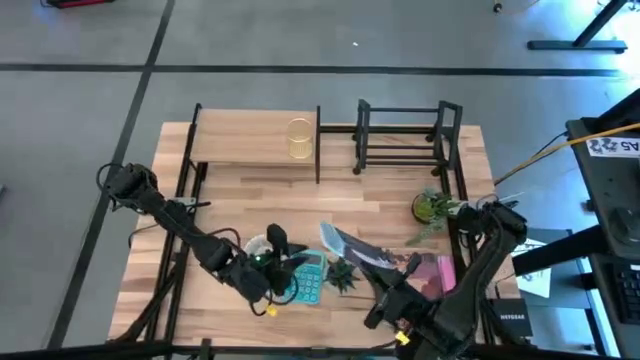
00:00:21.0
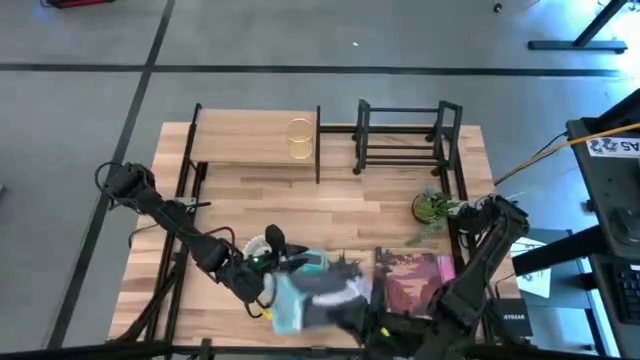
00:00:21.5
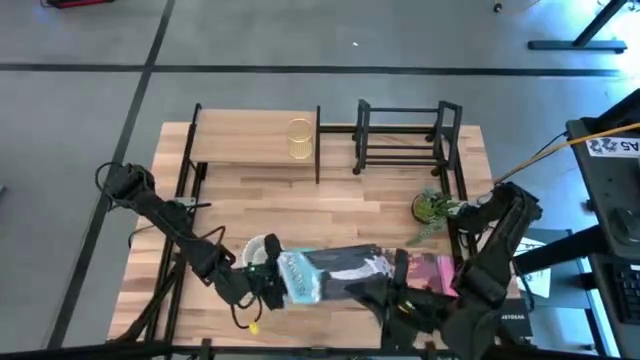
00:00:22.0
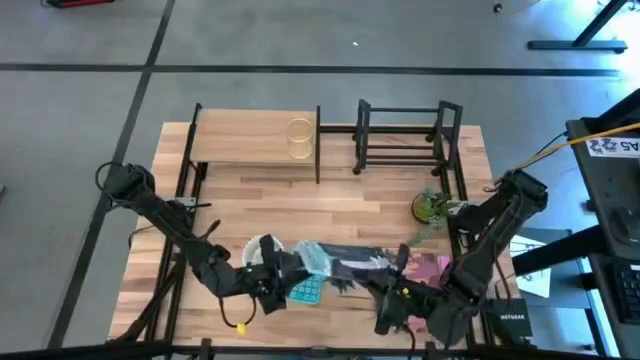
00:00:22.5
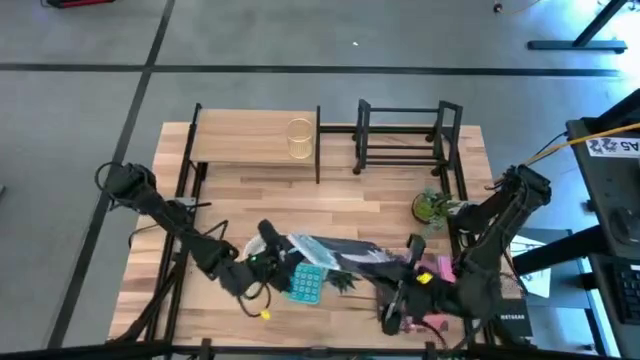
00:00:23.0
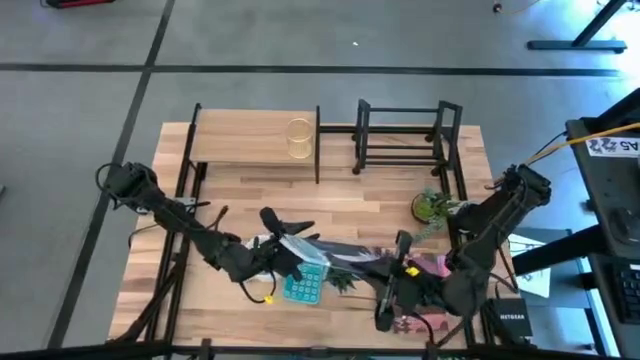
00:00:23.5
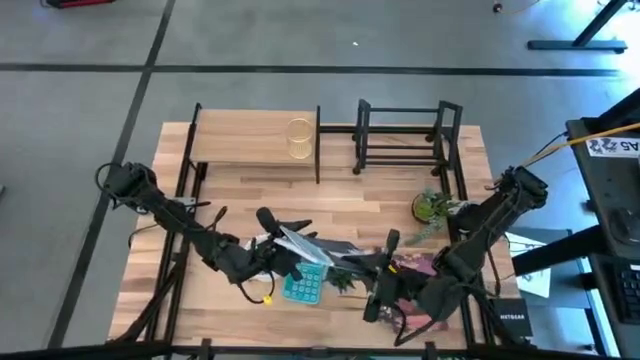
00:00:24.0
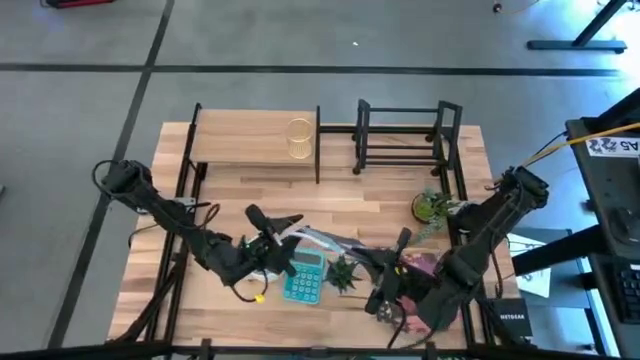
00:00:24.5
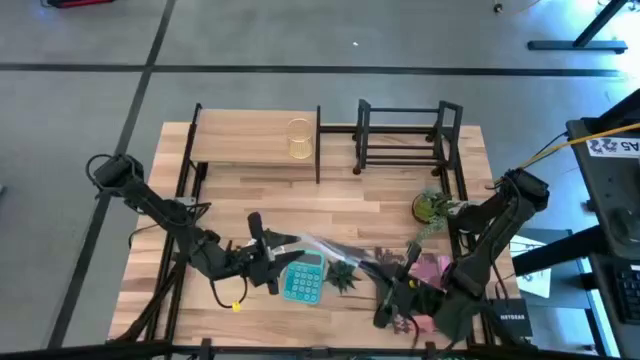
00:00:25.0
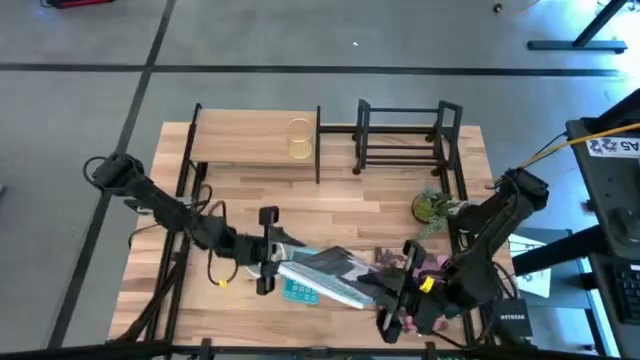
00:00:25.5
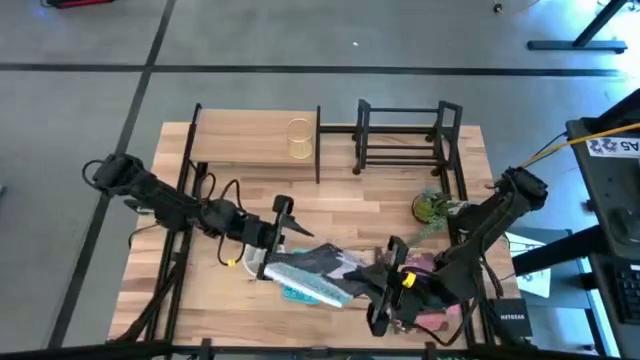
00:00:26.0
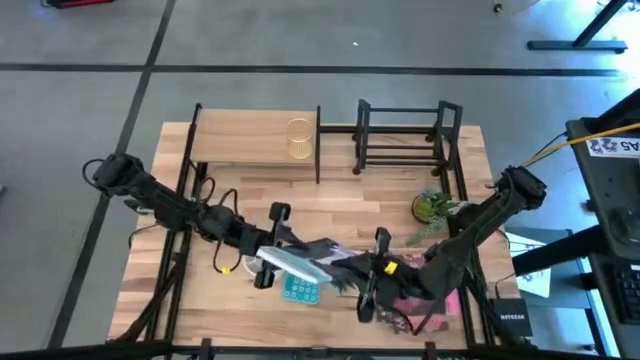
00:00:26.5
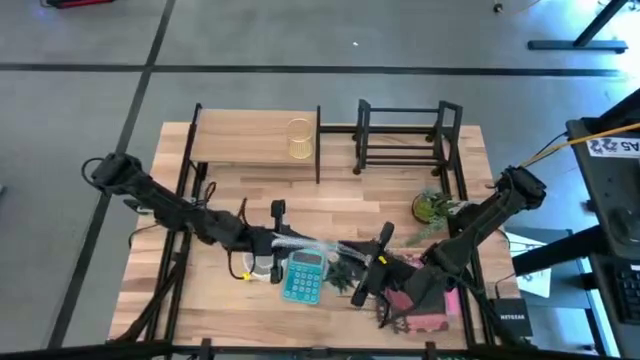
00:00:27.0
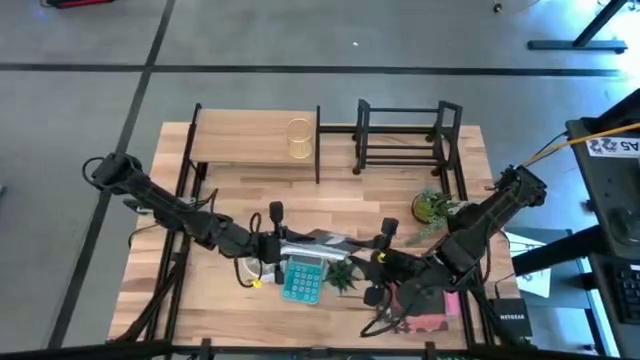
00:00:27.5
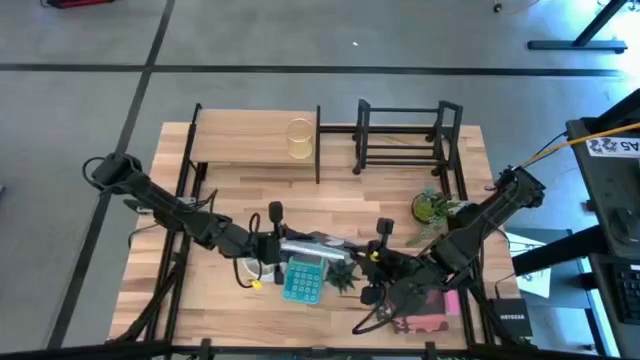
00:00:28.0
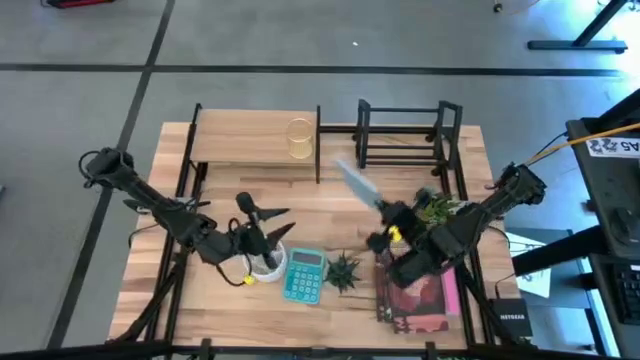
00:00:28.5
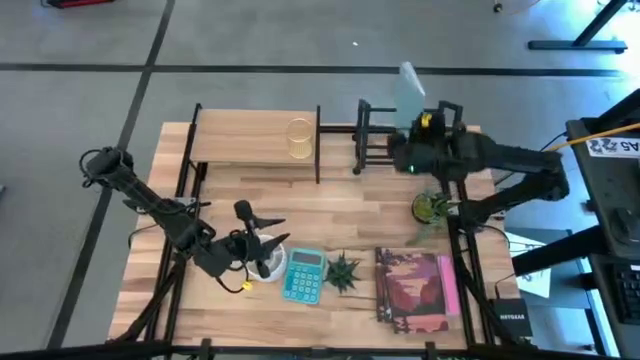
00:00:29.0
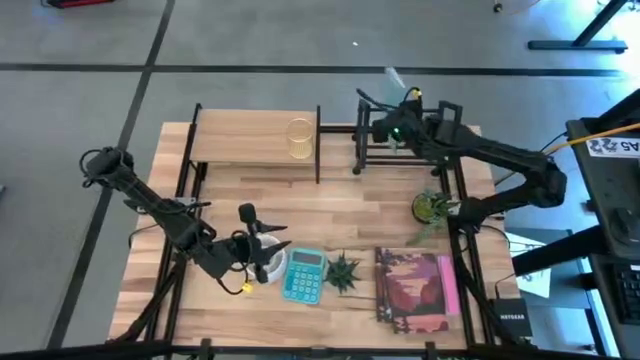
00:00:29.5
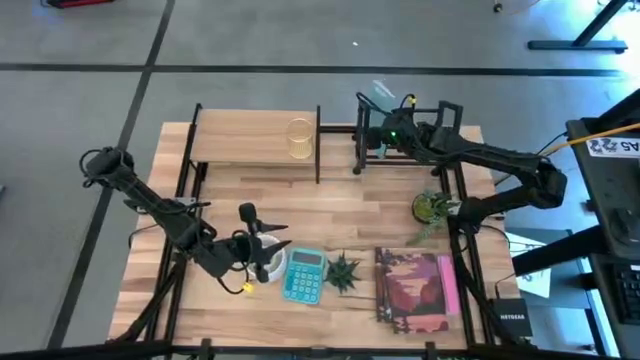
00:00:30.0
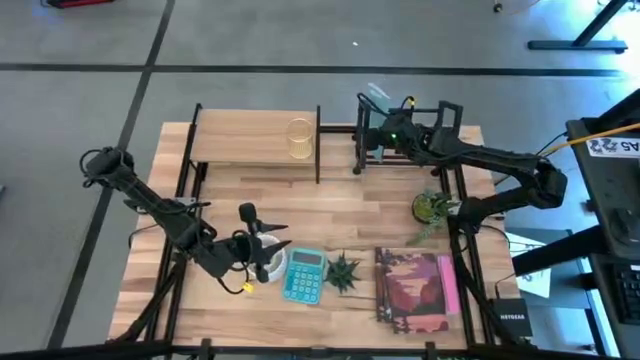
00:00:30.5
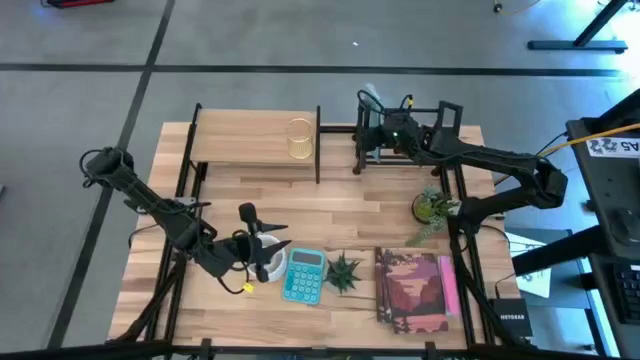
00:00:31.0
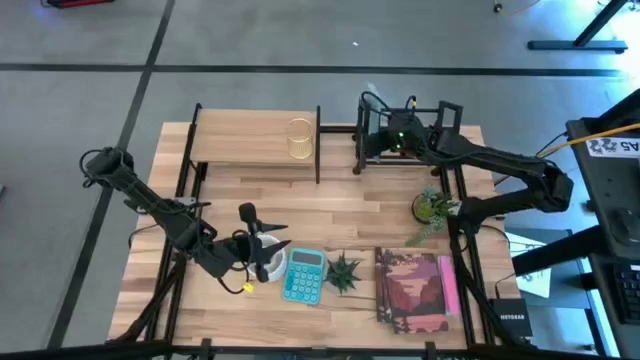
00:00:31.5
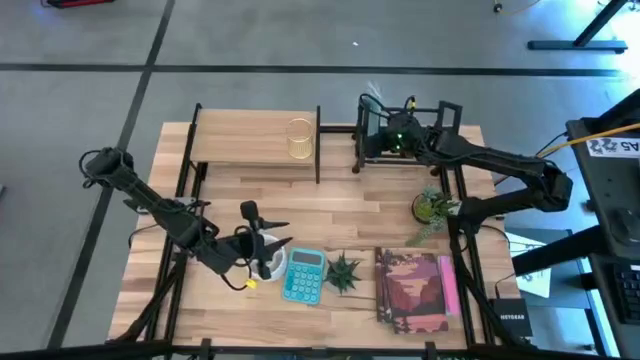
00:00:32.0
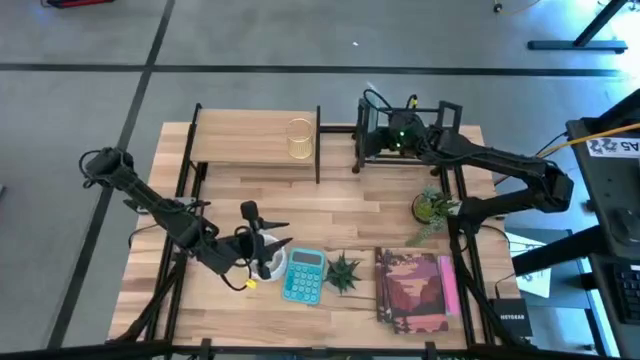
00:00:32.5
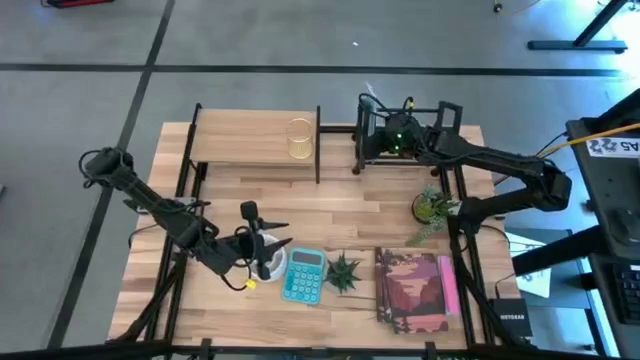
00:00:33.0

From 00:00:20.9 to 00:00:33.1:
Task: Stock shelves
Put the blue book on the bookshelf

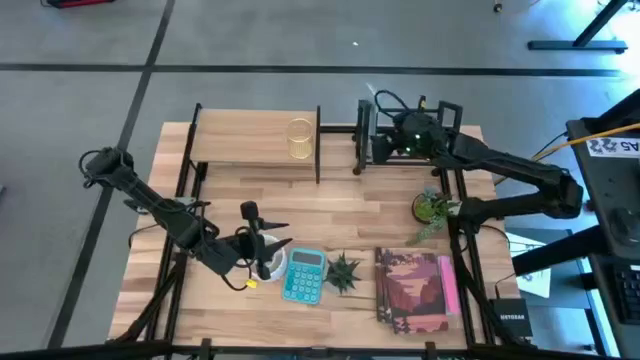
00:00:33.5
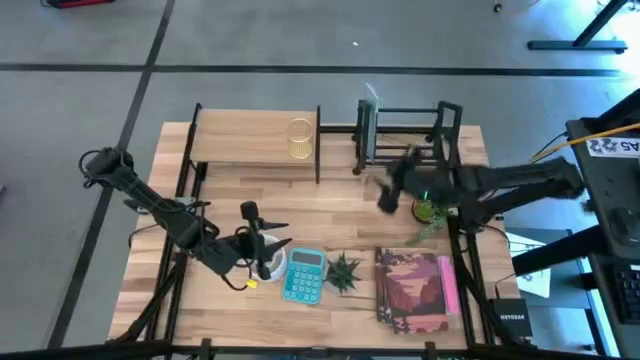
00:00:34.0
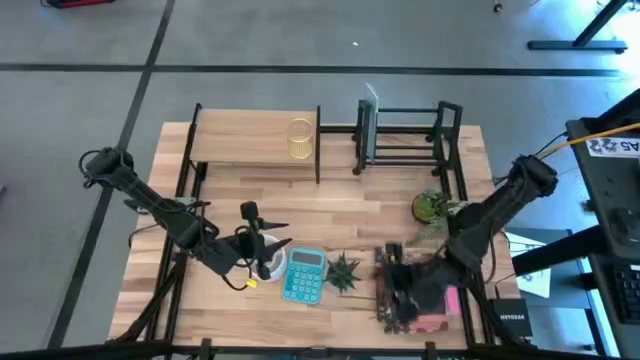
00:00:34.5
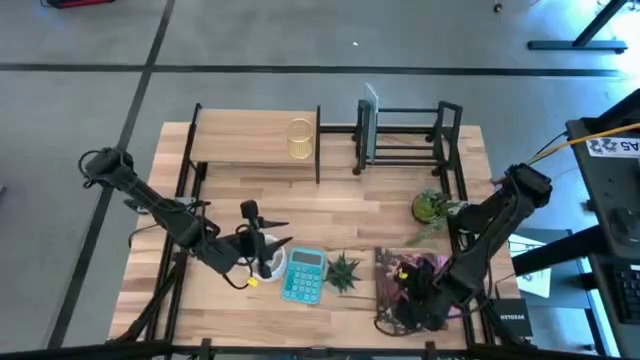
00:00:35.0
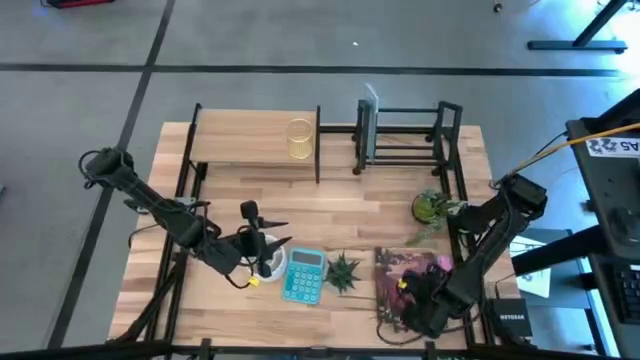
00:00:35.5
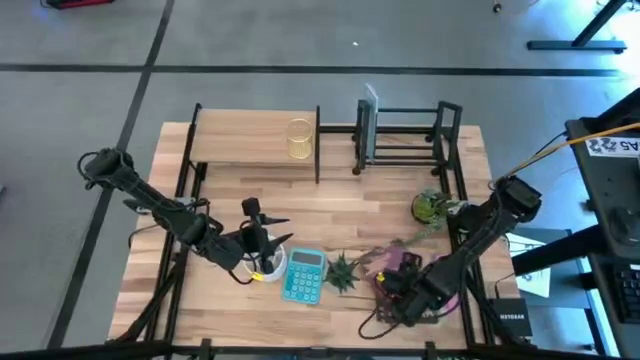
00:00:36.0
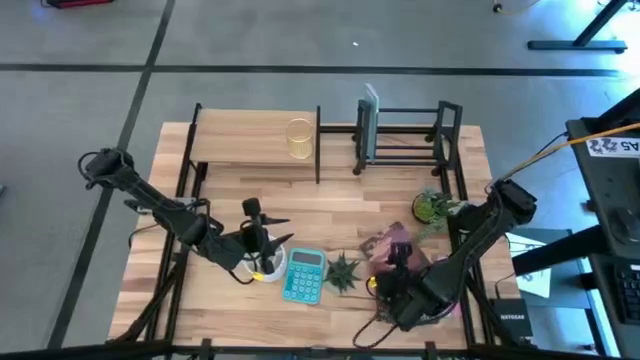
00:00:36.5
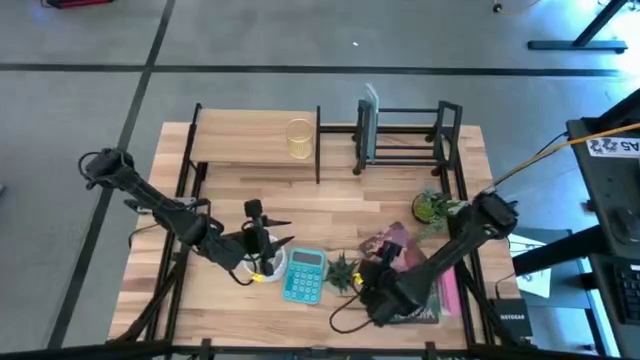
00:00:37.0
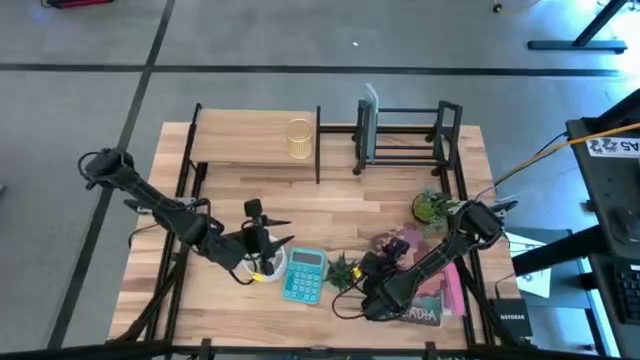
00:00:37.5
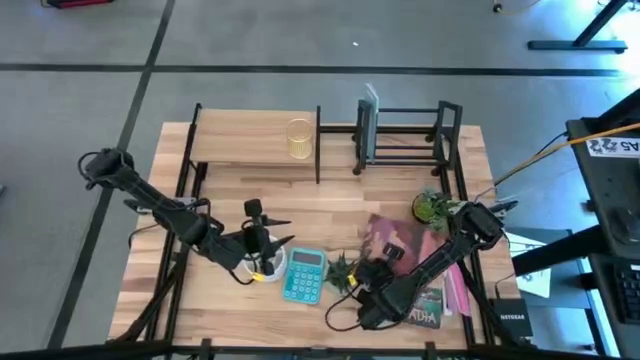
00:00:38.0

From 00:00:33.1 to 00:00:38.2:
Put the purple book on the book shelf

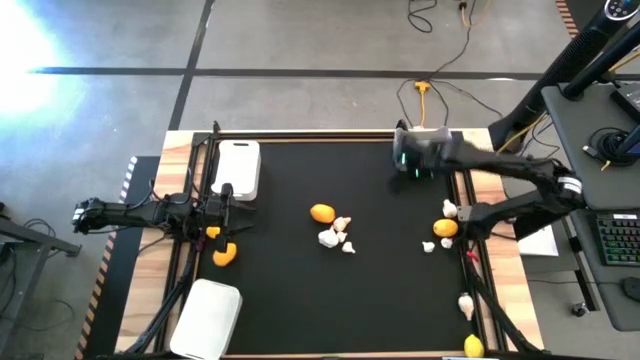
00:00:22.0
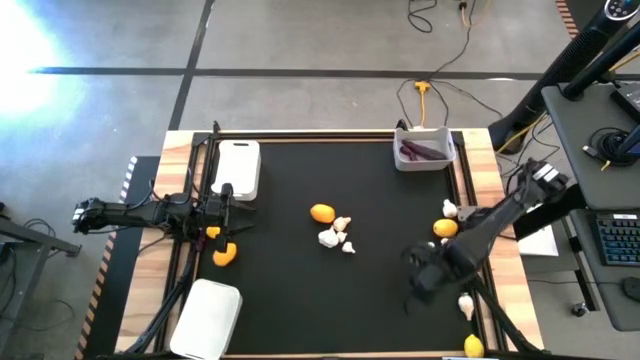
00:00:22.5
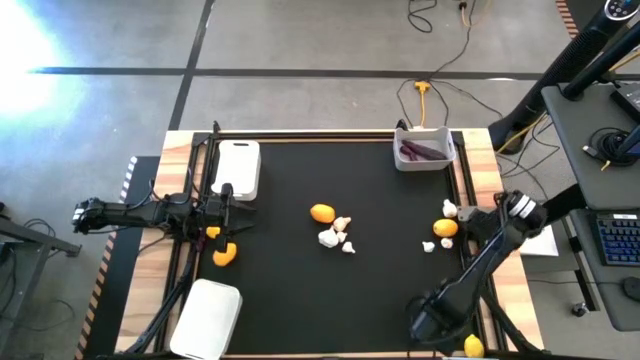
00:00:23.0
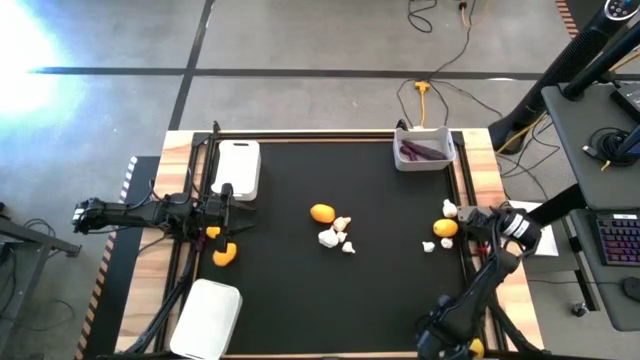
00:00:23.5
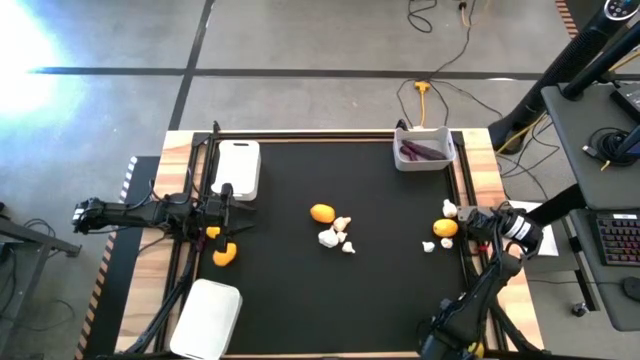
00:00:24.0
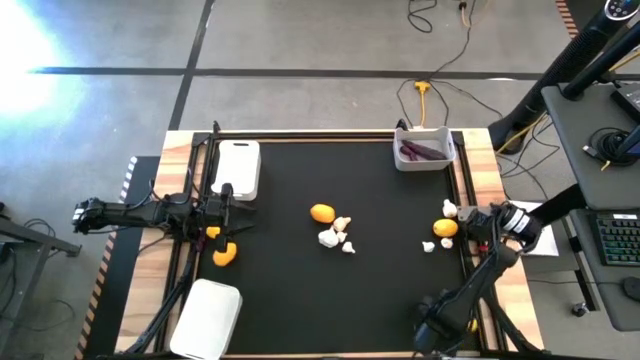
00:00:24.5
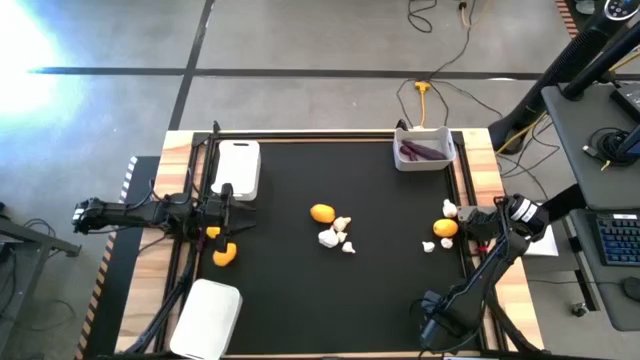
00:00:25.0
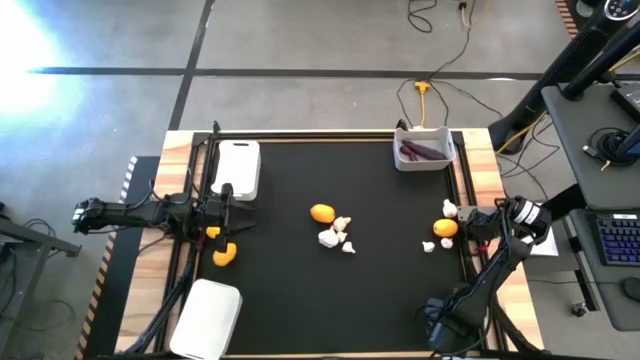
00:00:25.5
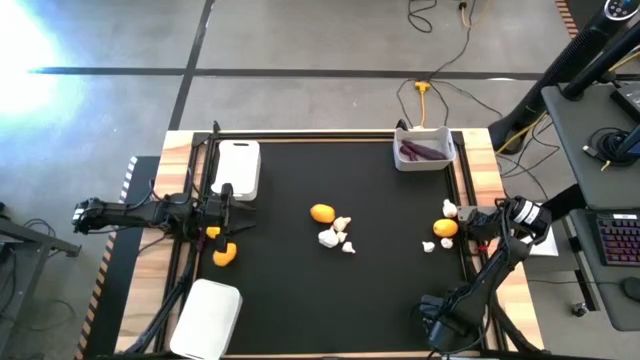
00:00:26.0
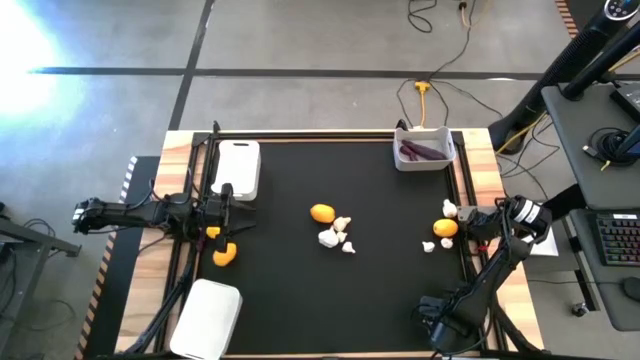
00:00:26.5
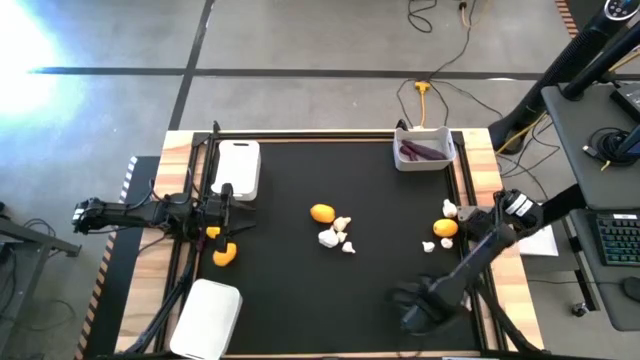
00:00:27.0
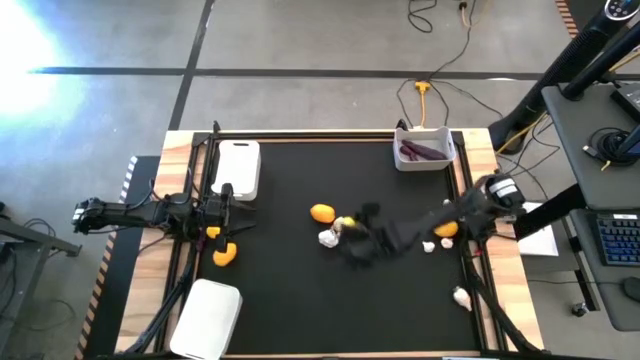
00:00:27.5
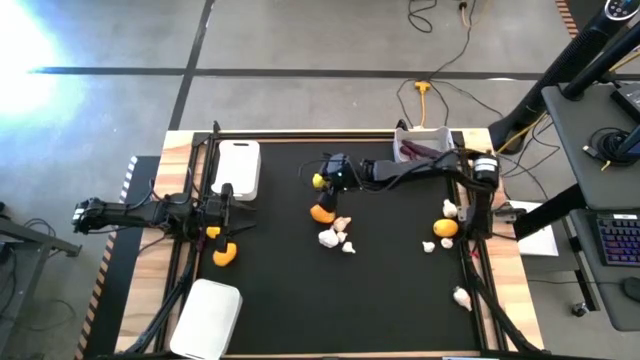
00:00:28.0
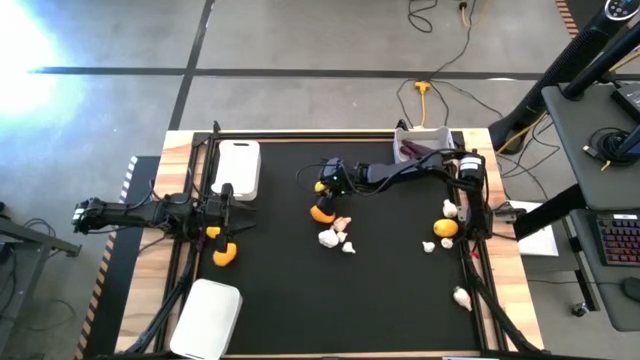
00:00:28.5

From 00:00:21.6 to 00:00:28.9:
Task: Sort produce into baskets
Move the lemon to the center of the table
